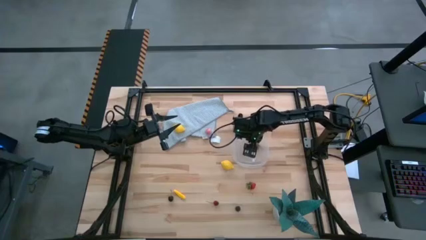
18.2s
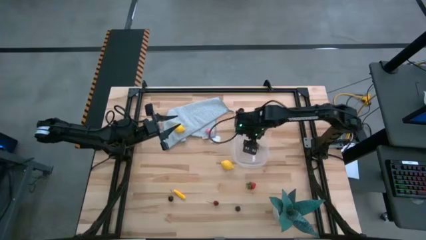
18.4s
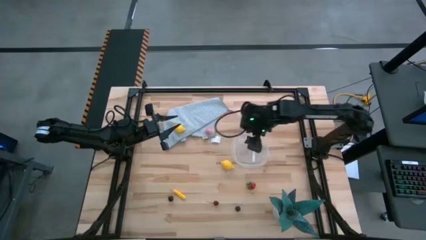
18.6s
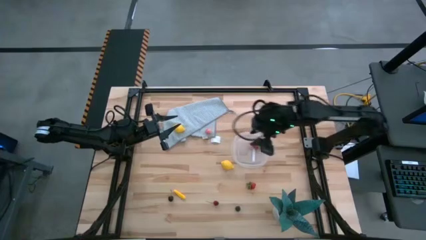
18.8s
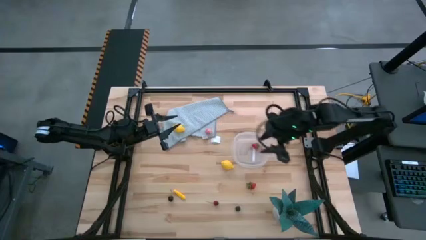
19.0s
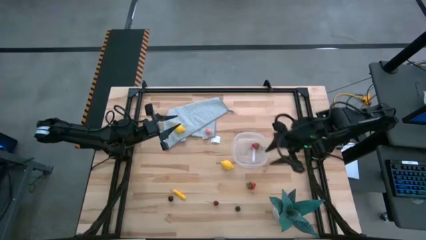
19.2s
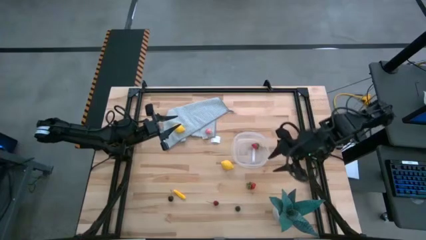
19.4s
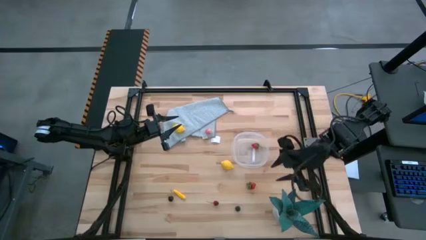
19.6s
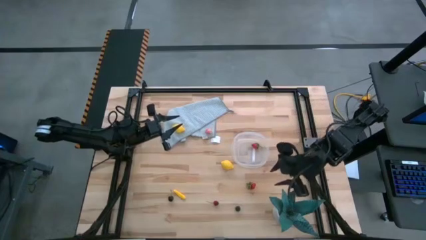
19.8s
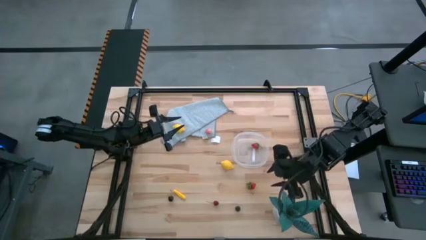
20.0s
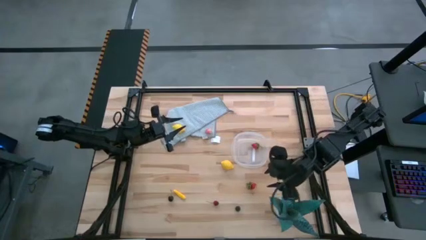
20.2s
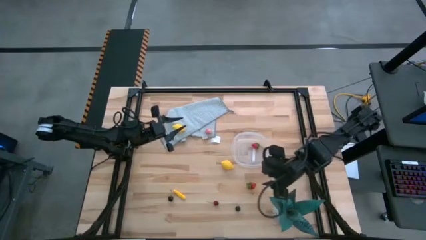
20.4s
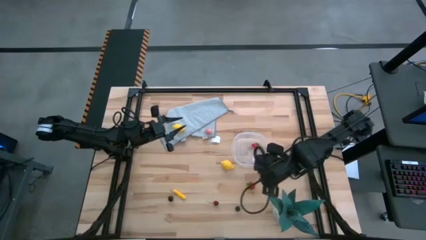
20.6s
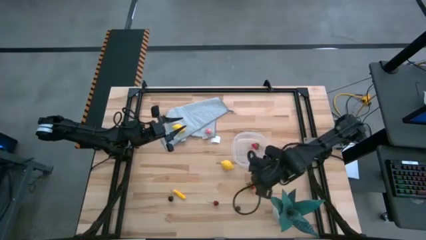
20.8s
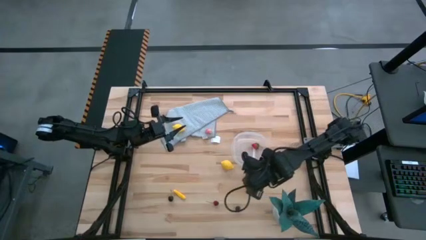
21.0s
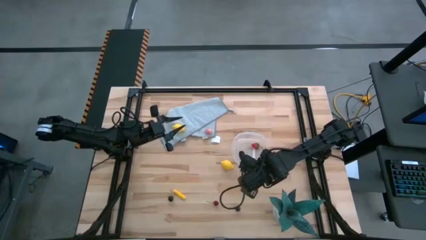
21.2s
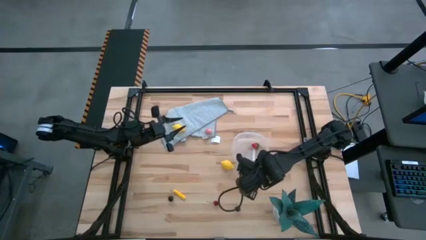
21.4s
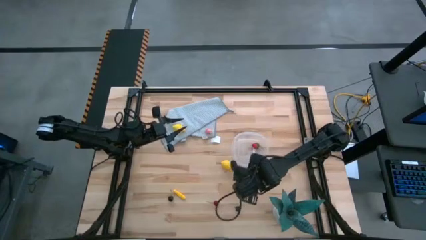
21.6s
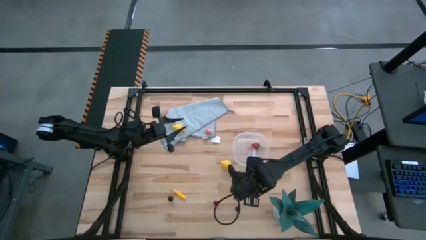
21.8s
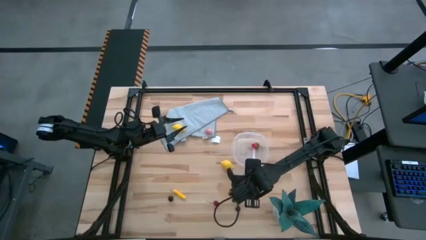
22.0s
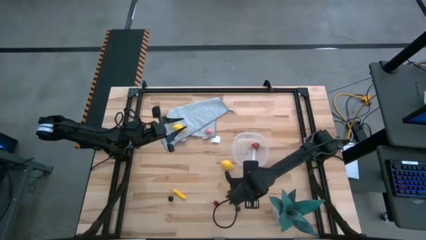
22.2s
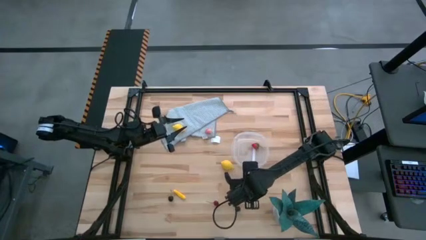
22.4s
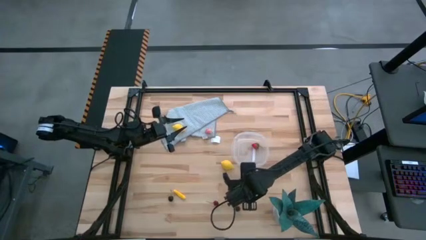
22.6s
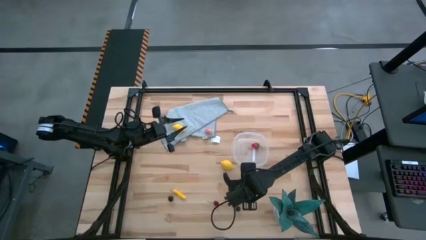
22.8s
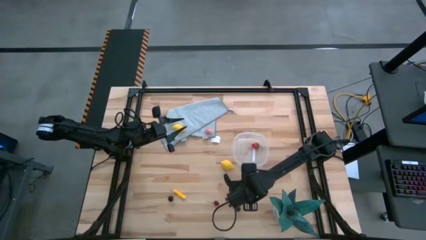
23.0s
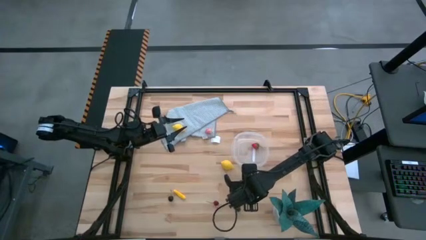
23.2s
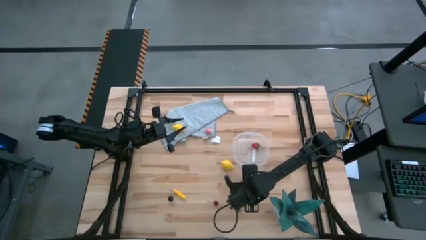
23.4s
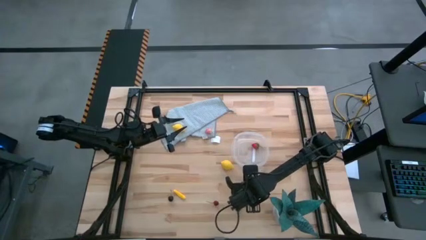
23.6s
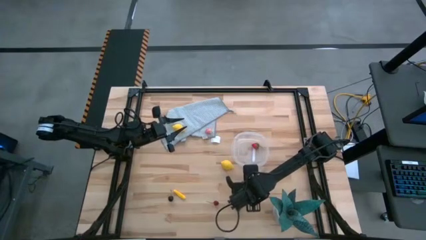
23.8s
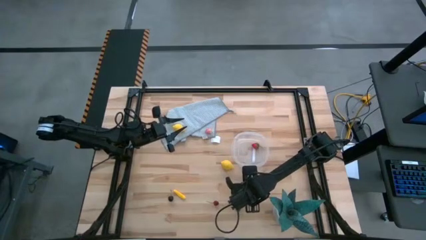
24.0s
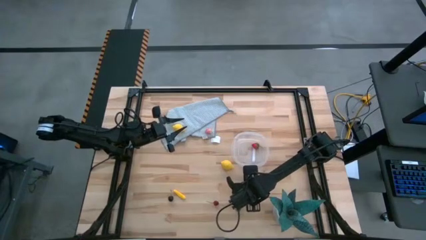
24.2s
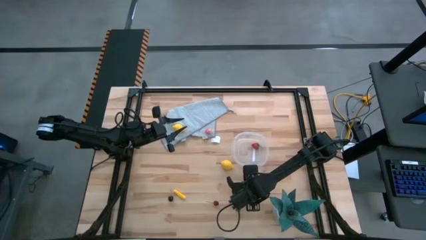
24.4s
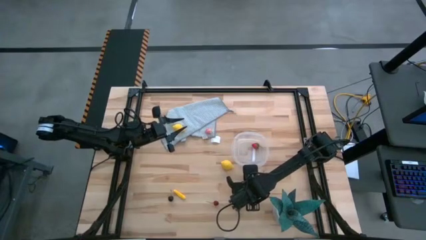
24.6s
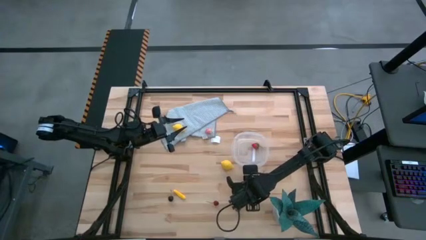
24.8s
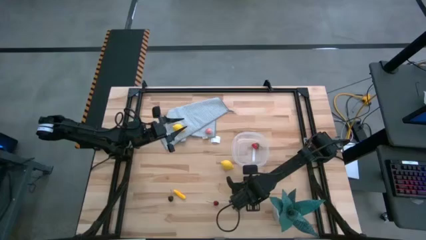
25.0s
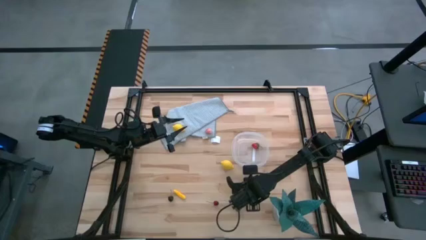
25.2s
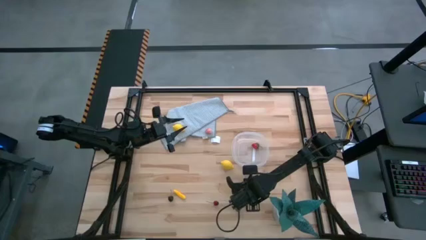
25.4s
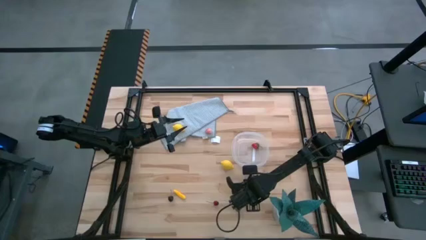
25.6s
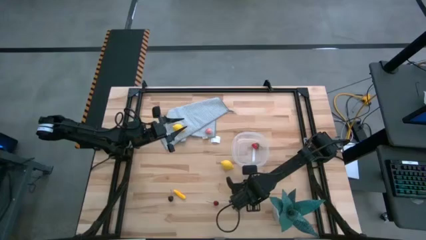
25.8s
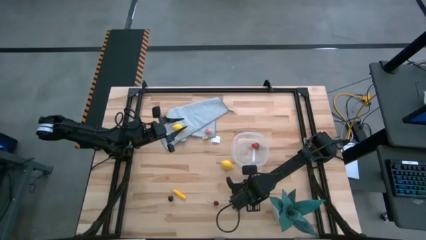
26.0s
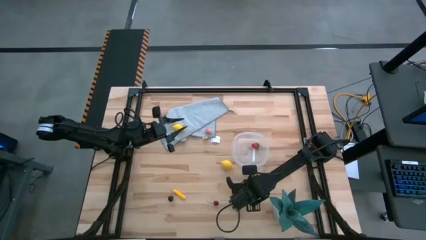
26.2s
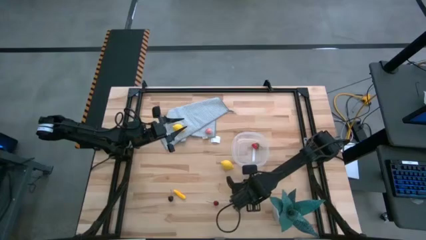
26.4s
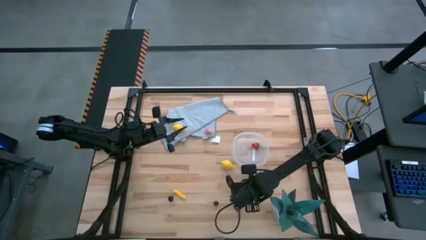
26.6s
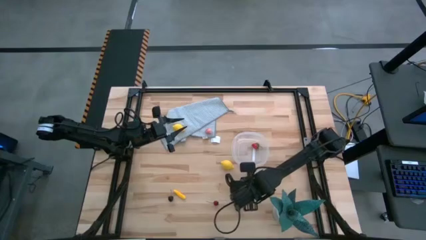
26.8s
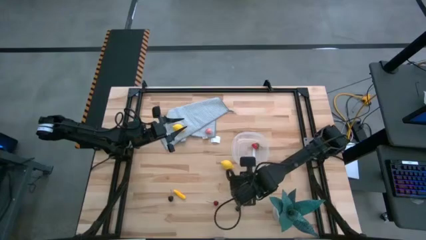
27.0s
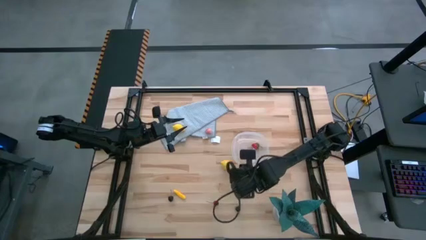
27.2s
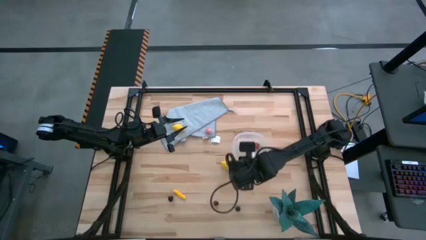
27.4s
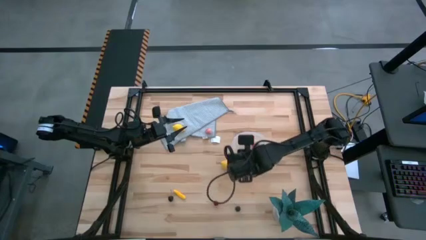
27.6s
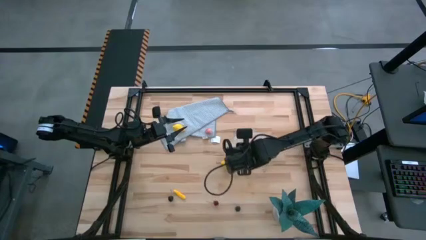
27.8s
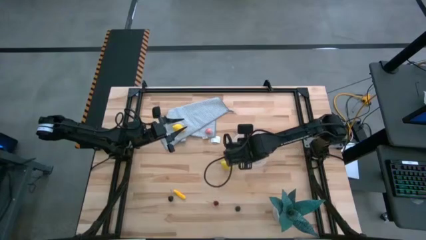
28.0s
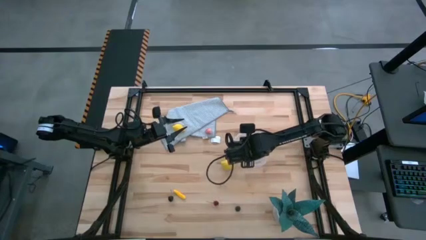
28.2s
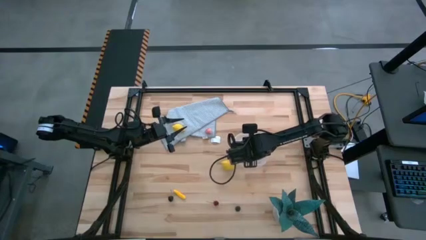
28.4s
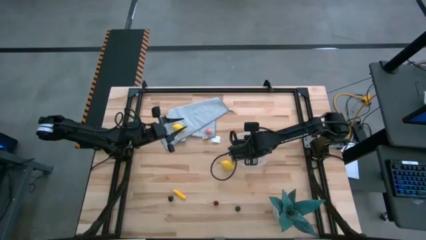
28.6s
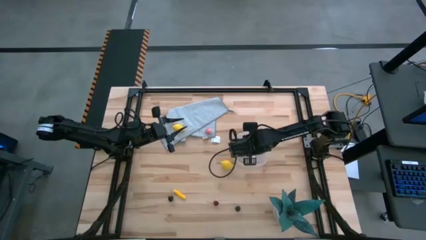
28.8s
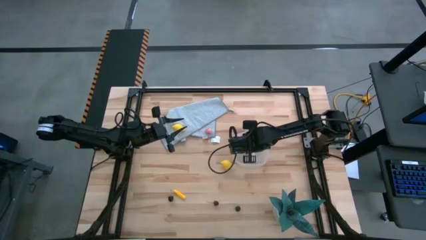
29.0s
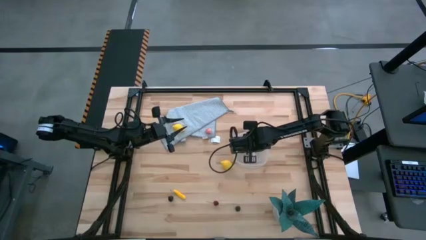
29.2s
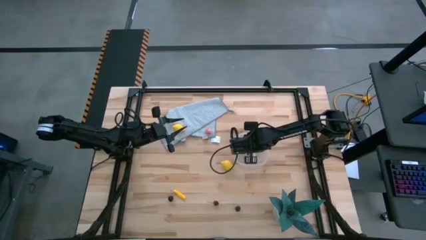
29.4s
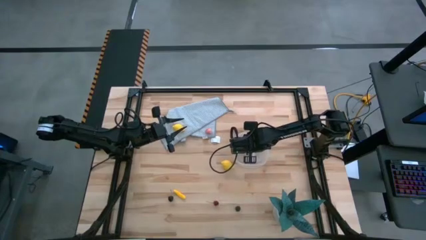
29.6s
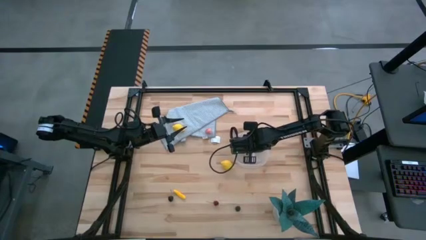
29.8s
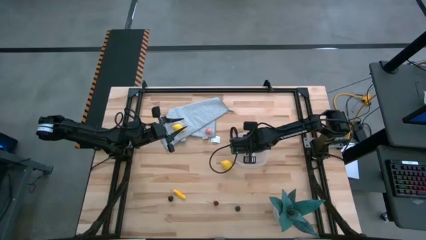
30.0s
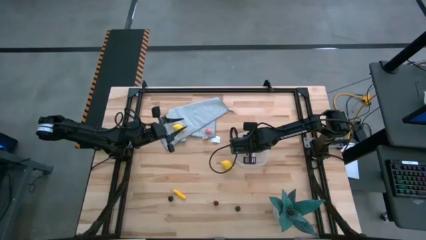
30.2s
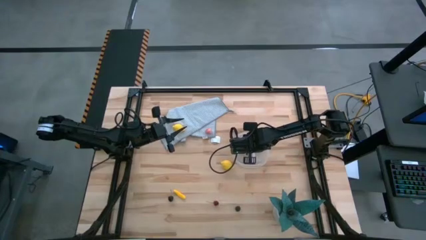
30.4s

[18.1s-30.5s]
Task: Pick and placing Produce into tupperware
Put the strawberry into the transparent container
